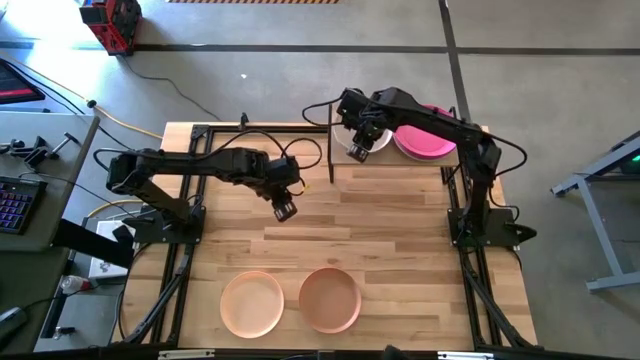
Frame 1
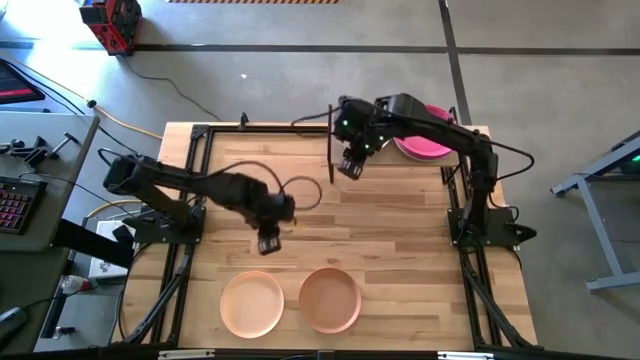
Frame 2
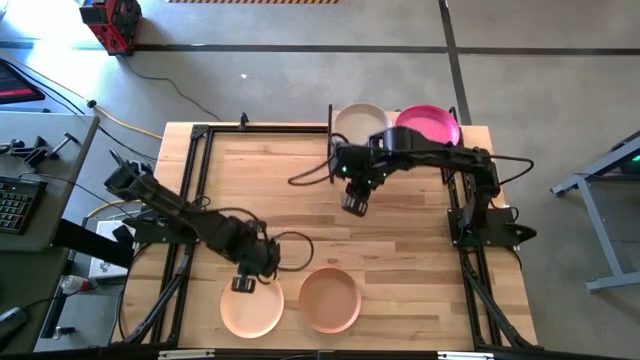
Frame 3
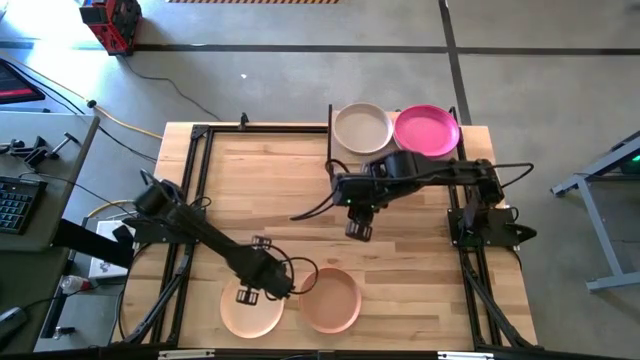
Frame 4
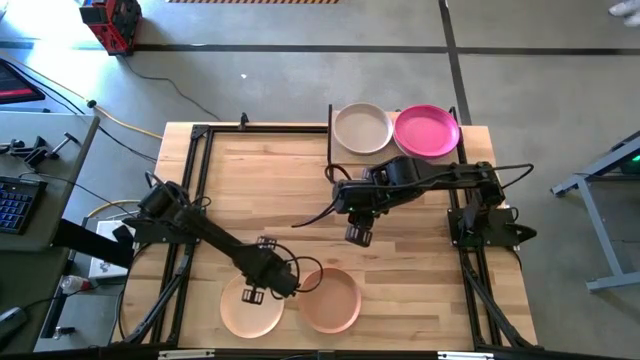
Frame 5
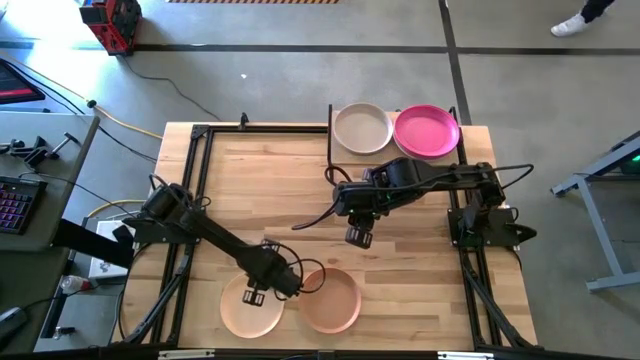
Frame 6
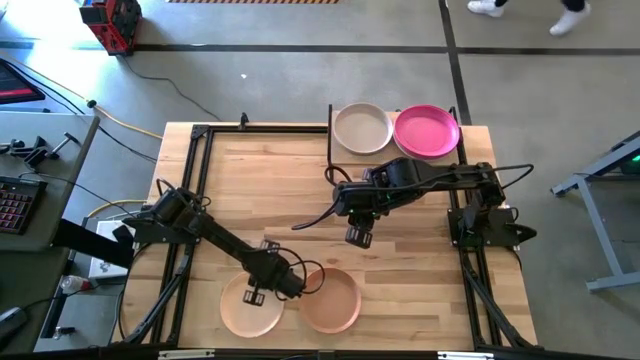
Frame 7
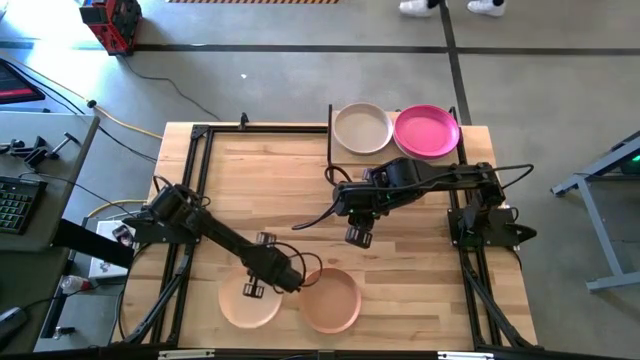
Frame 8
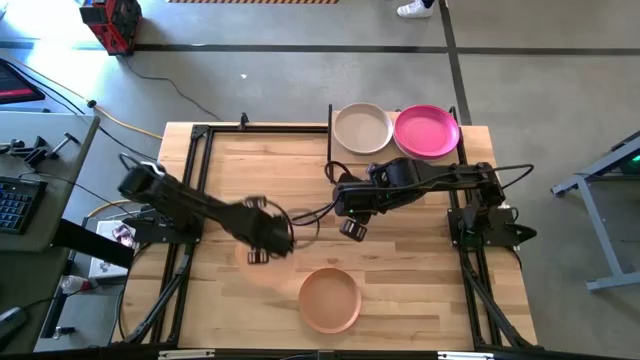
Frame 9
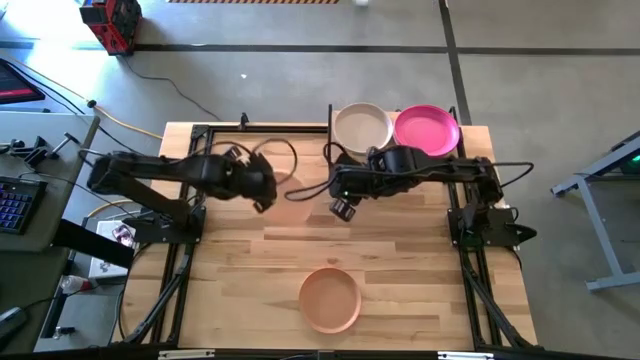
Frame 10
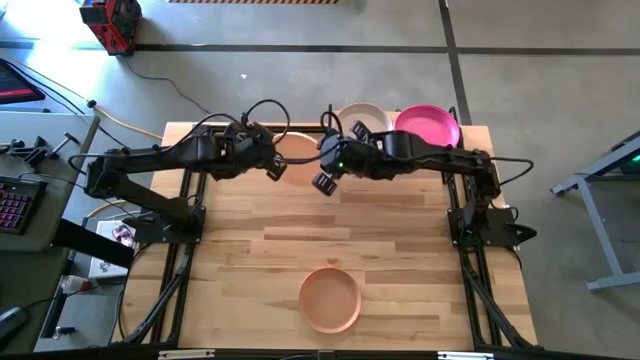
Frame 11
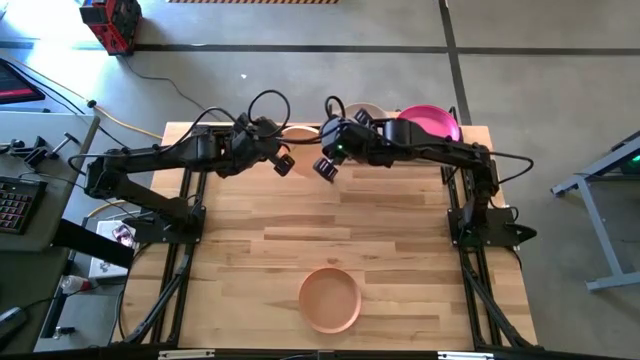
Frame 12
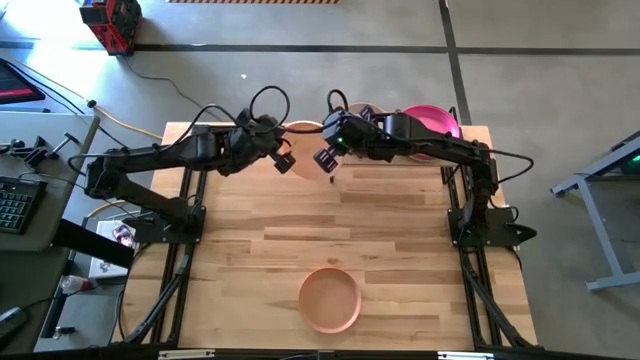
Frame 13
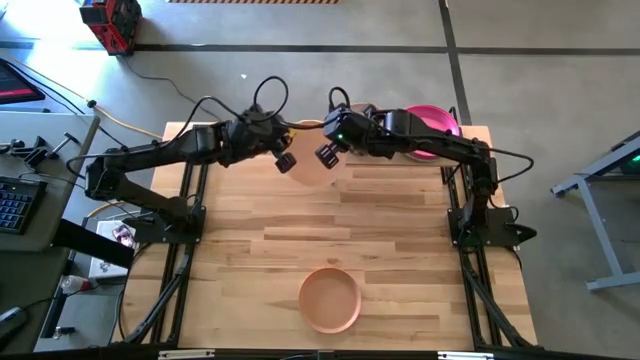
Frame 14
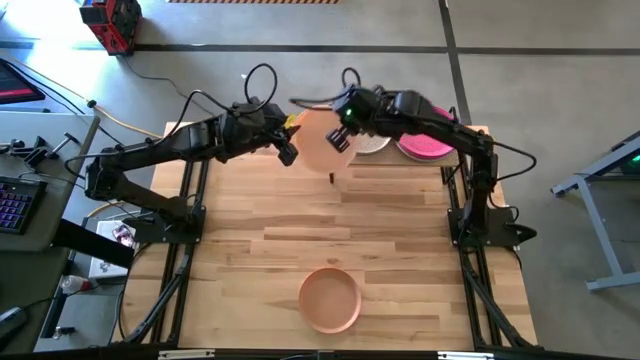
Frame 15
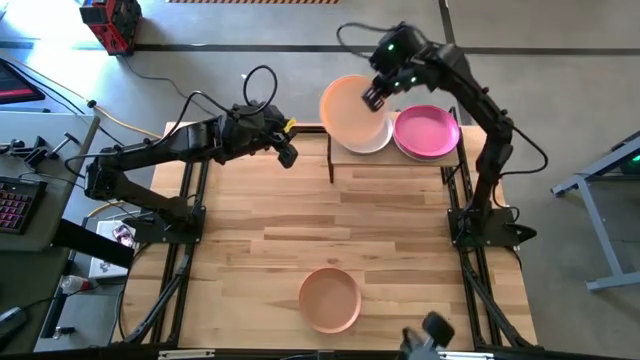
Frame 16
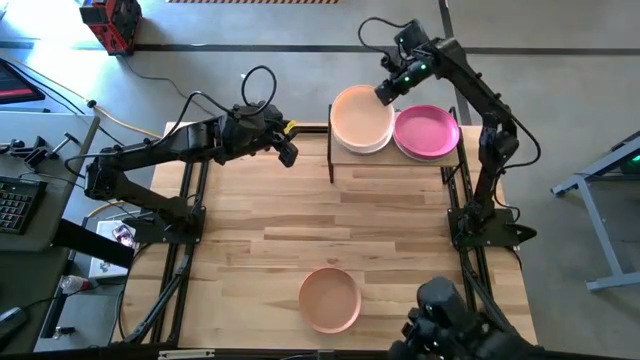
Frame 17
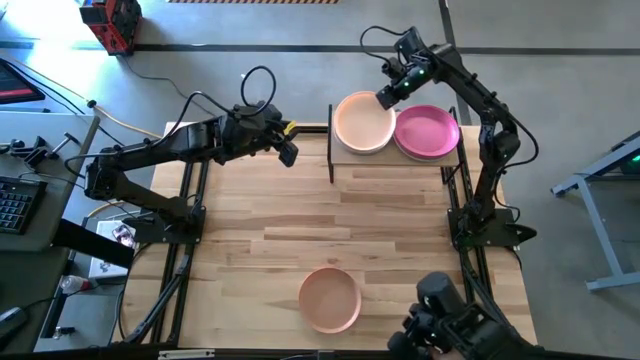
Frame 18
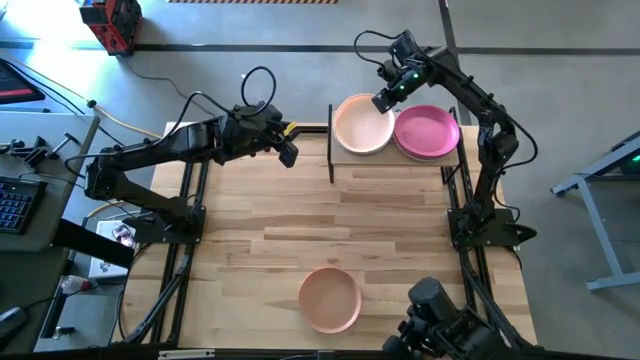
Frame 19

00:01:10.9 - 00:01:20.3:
Task: Place and stack plates onto a shelf
Stack the light yellow plate on the gray plate on the shelf

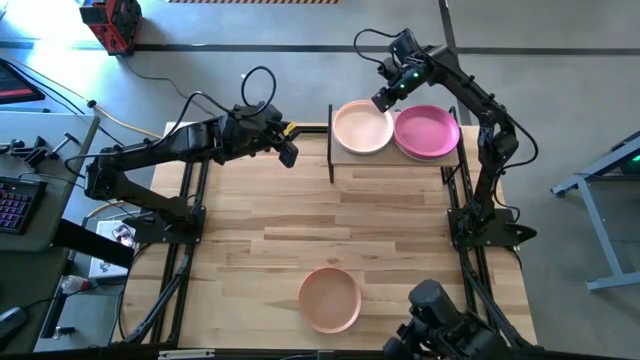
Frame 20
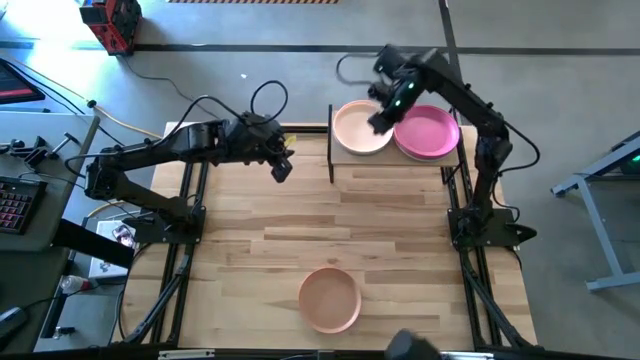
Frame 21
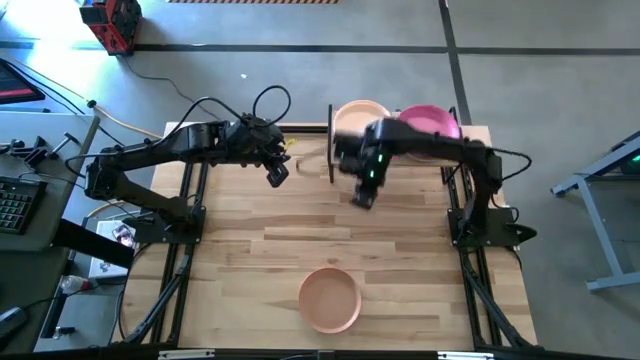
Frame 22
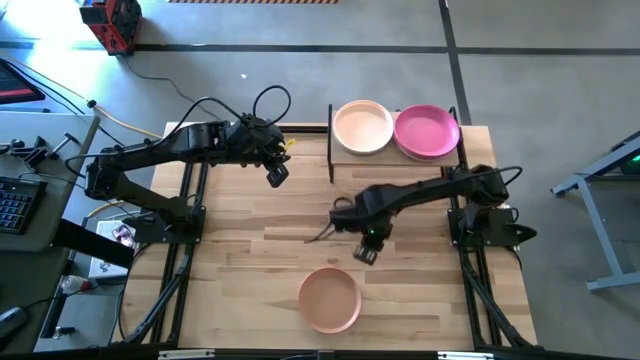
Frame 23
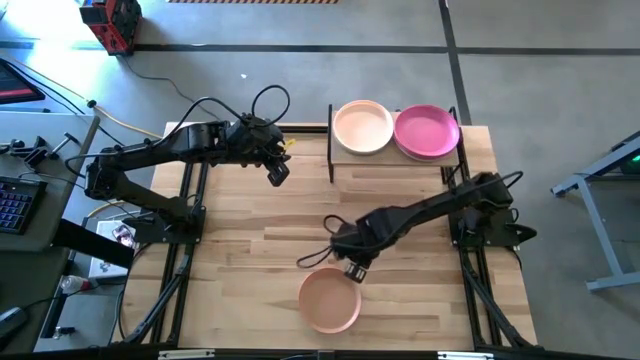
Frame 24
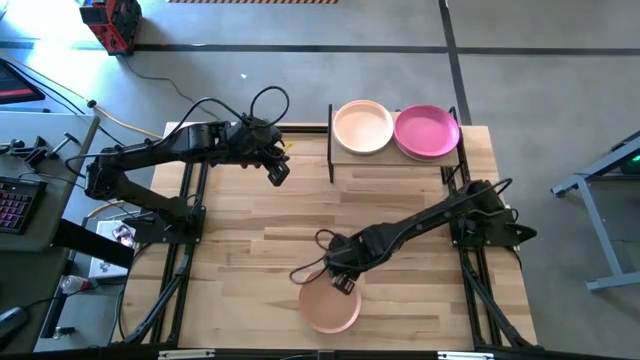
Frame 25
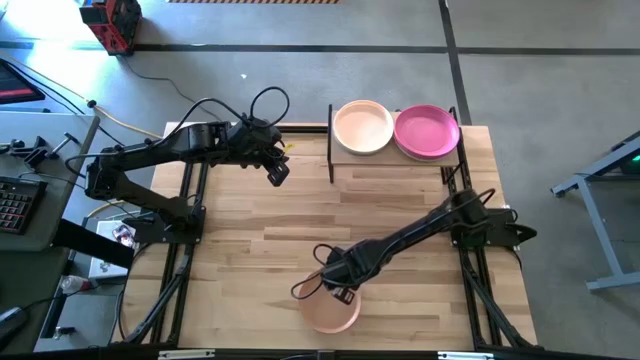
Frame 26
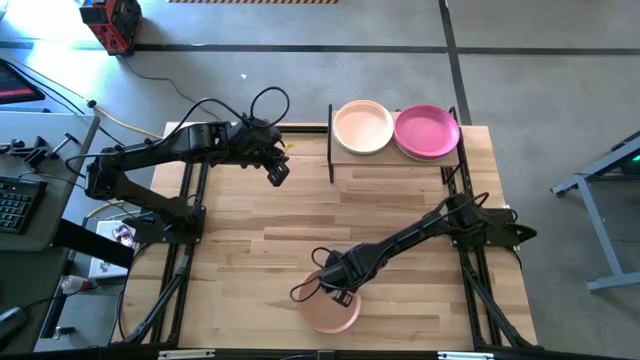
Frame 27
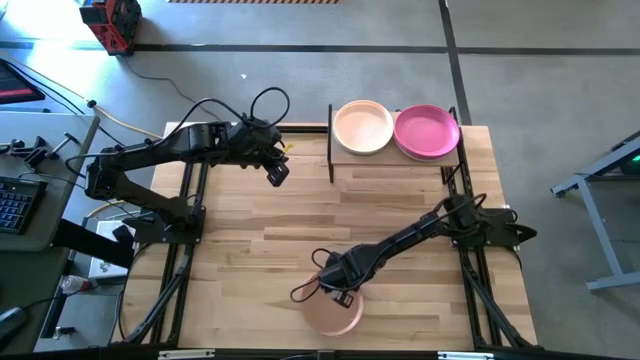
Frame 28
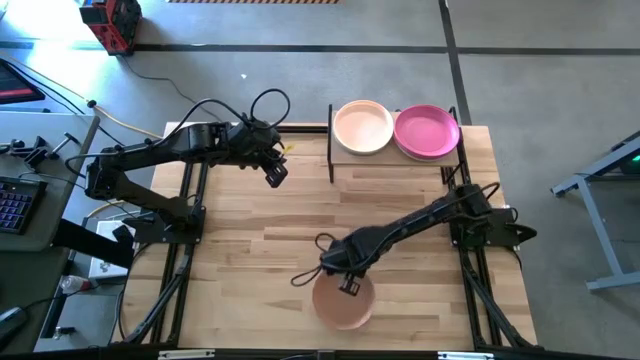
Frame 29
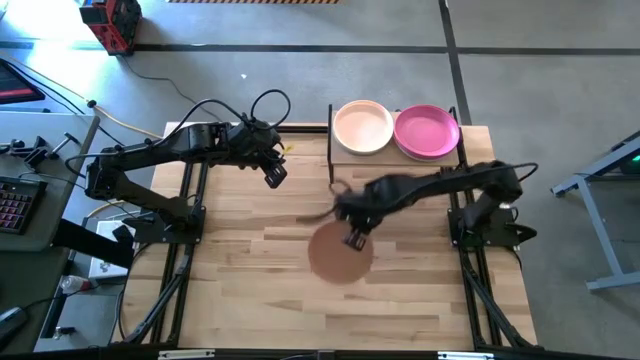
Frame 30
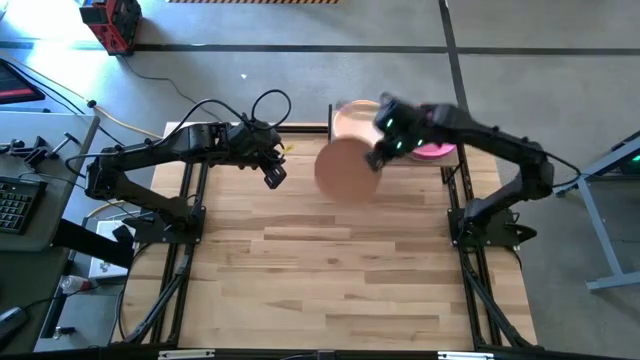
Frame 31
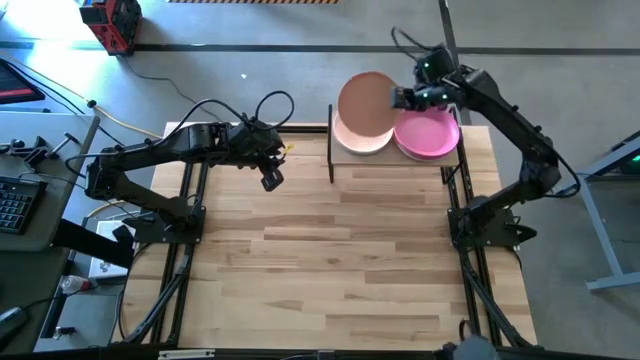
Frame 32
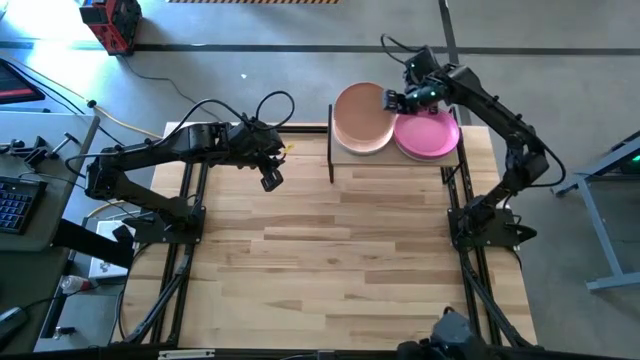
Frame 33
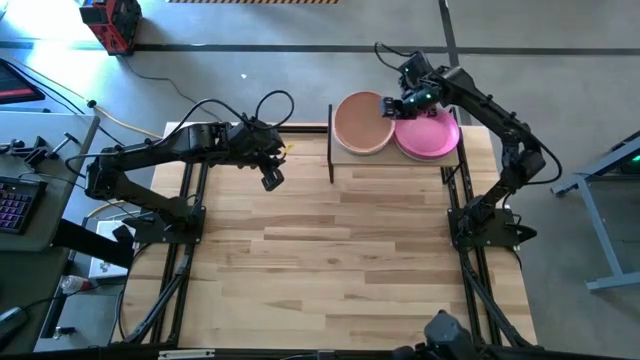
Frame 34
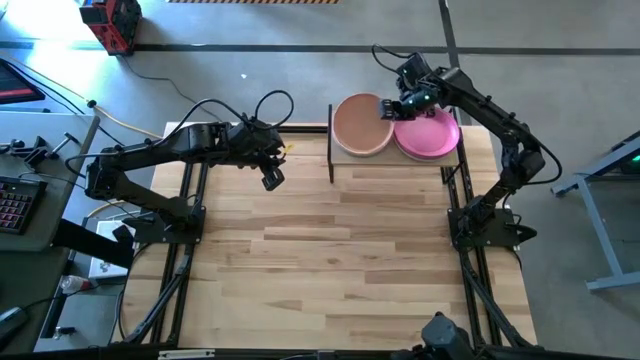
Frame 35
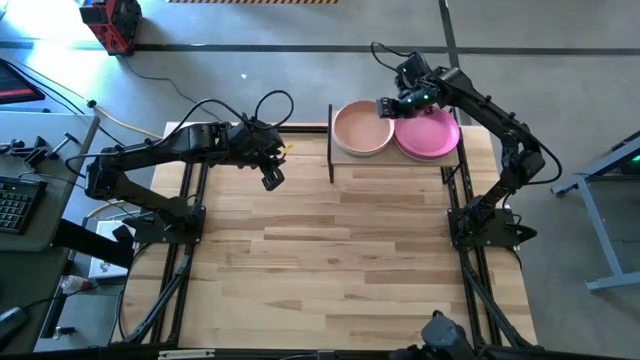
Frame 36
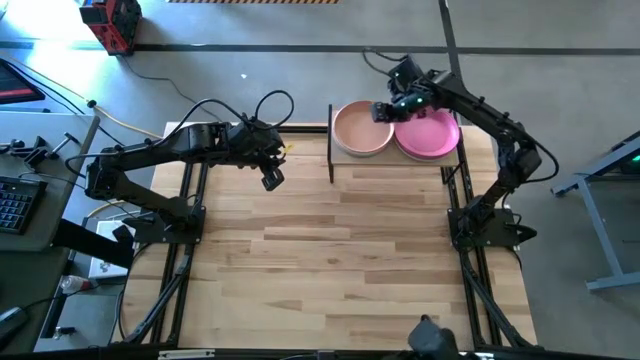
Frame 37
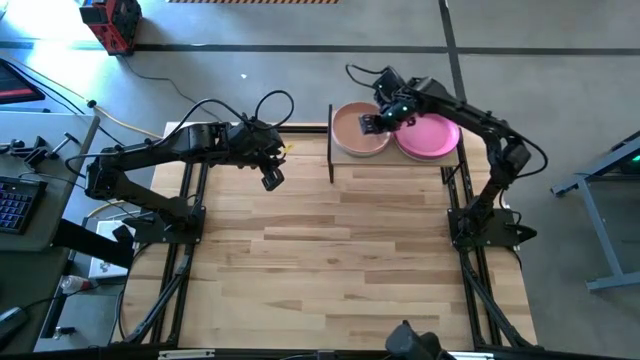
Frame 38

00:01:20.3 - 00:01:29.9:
Stack the light brown plate on the light yellow plate on the shelf

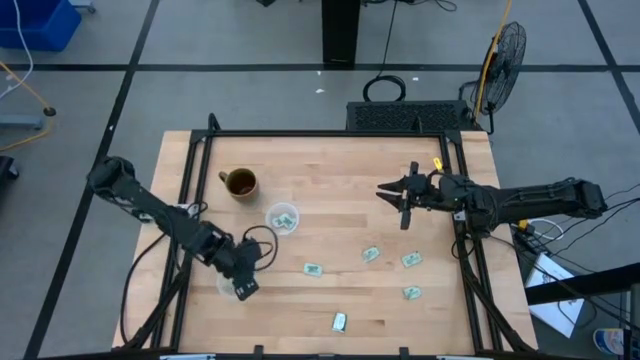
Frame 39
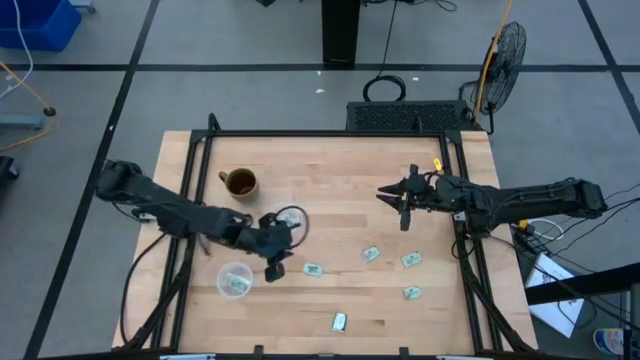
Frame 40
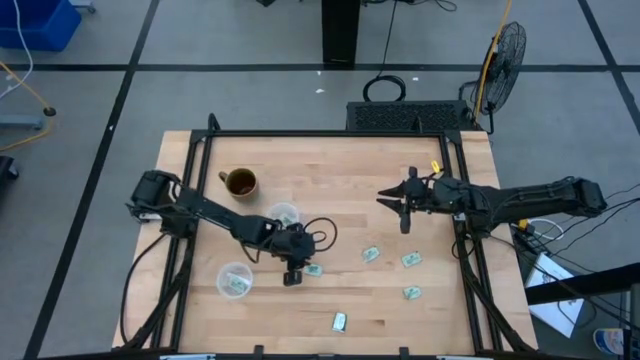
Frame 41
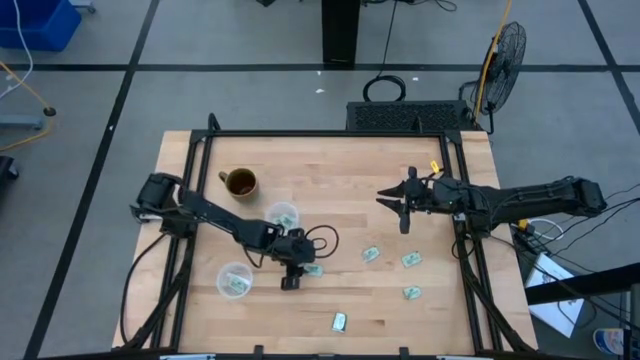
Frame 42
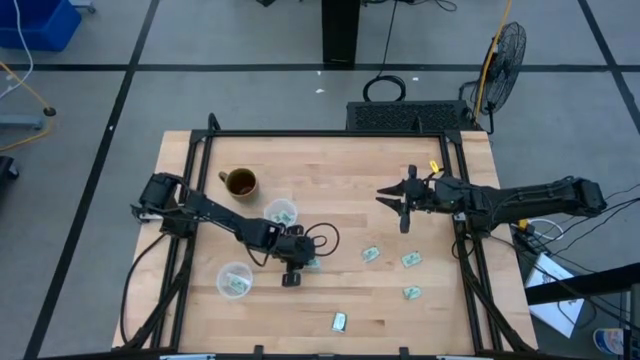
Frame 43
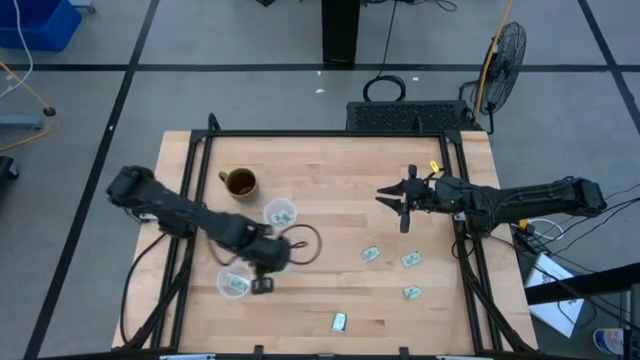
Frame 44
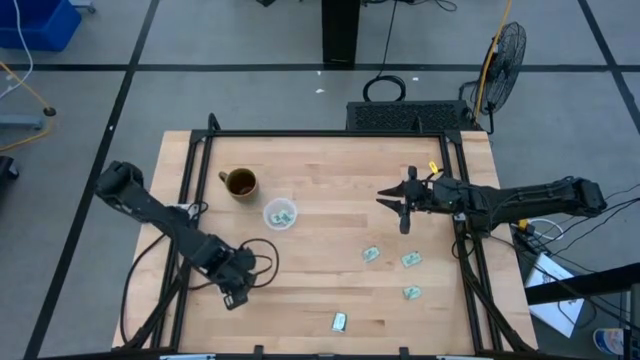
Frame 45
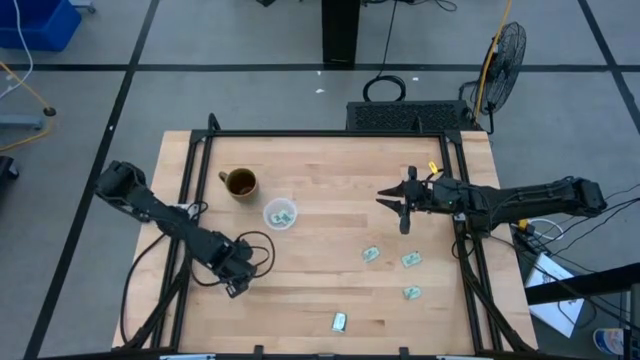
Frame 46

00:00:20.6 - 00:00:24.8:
Task: Pick and place Stevia / Truvia into bins
Put the stevia packet into the bottom transparent container
